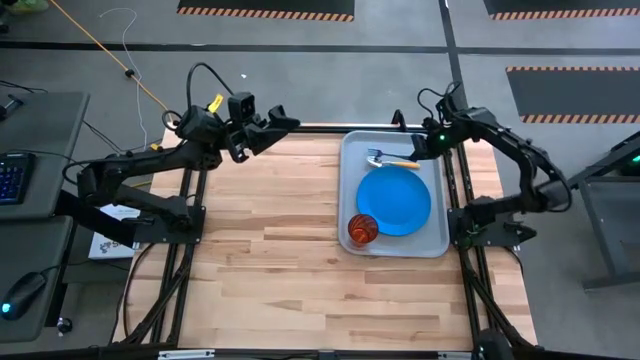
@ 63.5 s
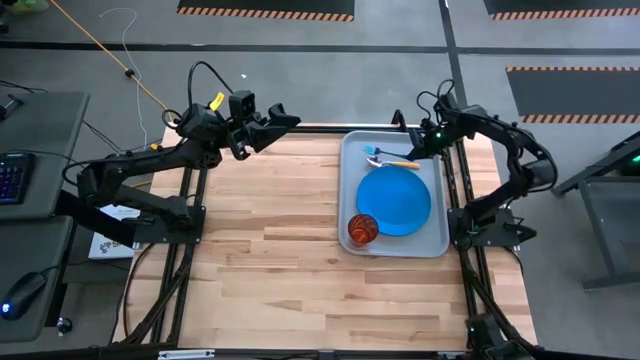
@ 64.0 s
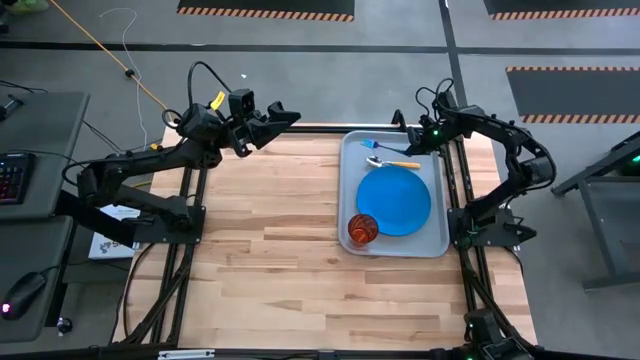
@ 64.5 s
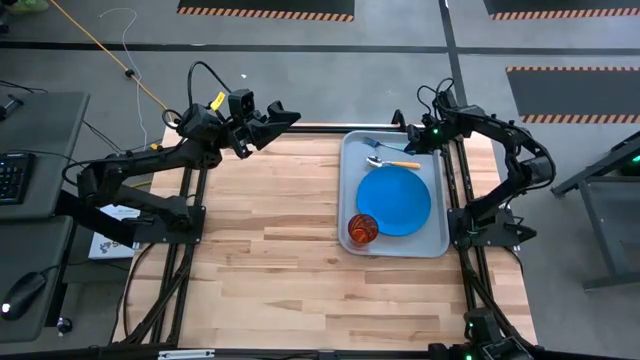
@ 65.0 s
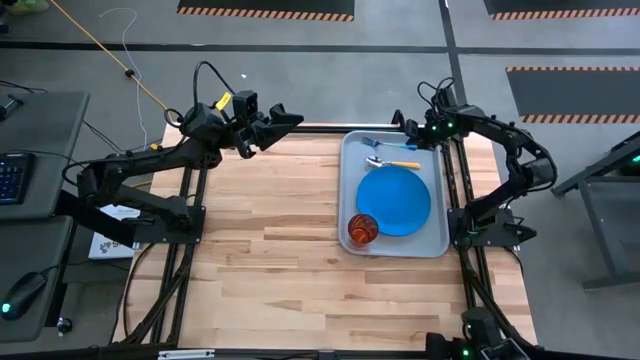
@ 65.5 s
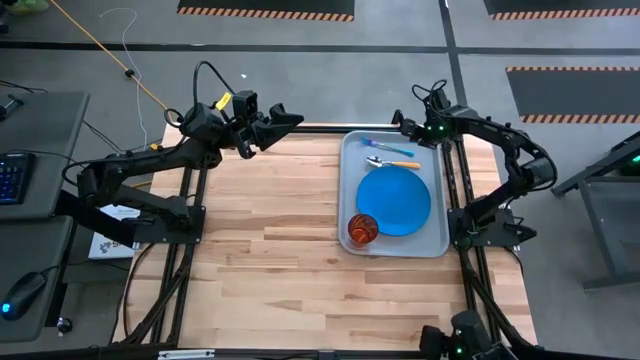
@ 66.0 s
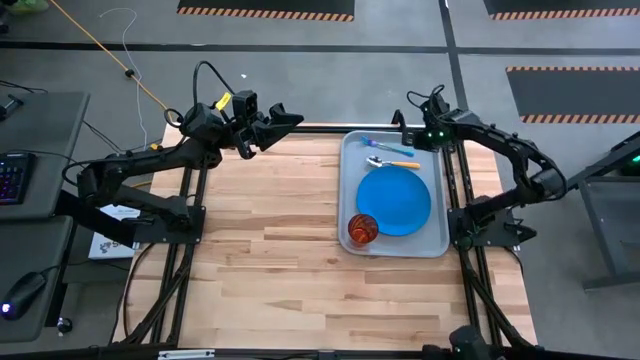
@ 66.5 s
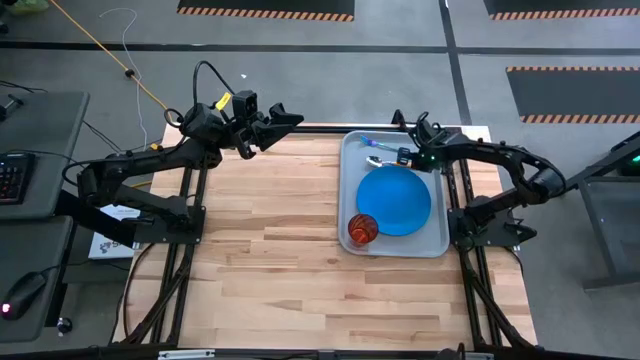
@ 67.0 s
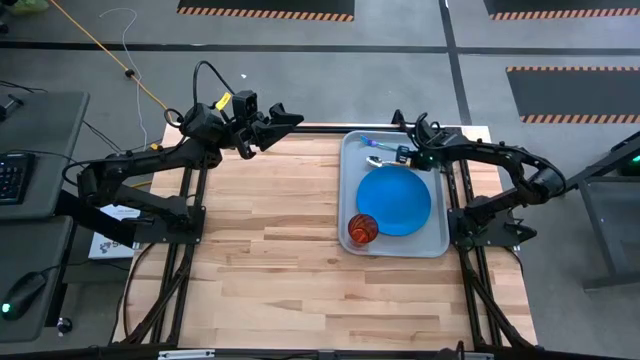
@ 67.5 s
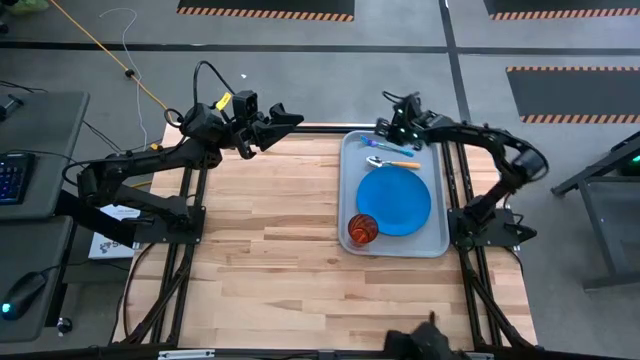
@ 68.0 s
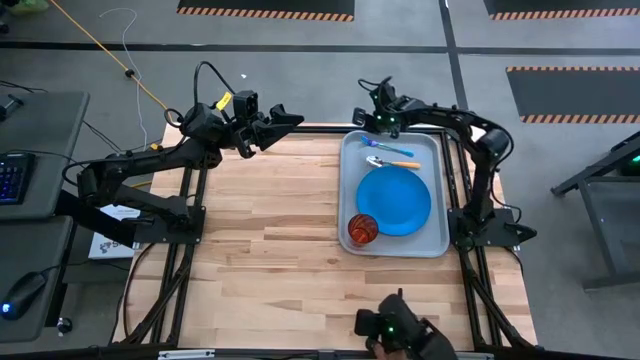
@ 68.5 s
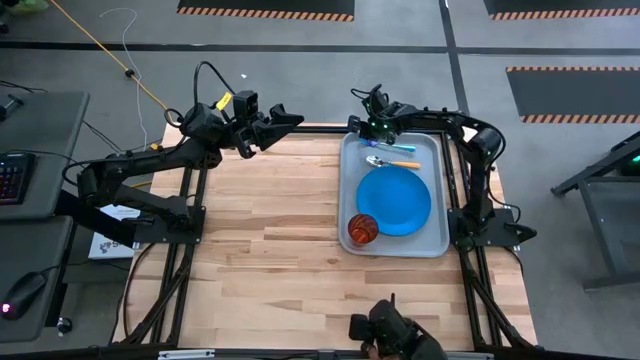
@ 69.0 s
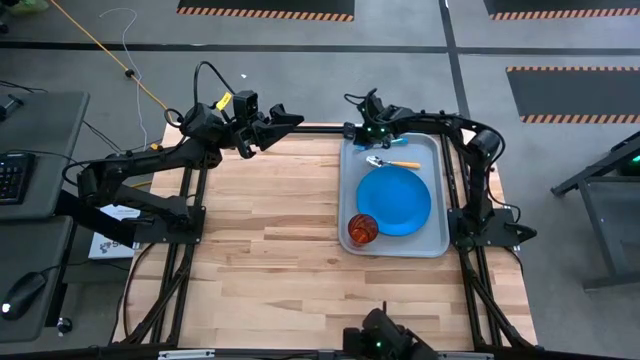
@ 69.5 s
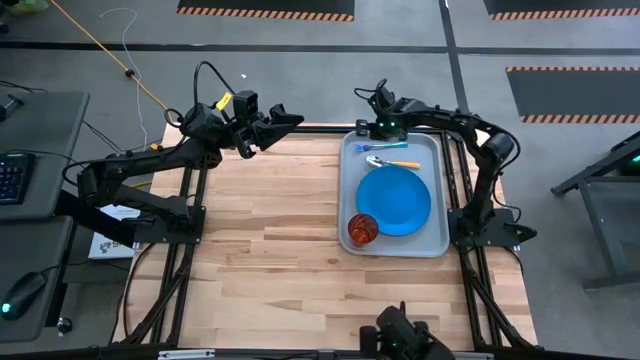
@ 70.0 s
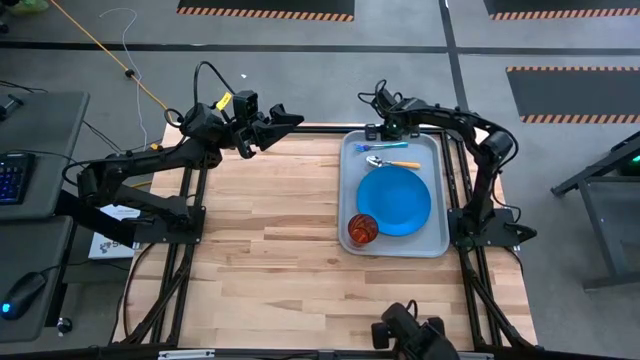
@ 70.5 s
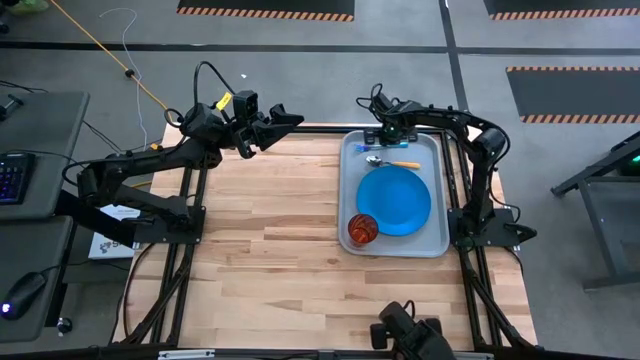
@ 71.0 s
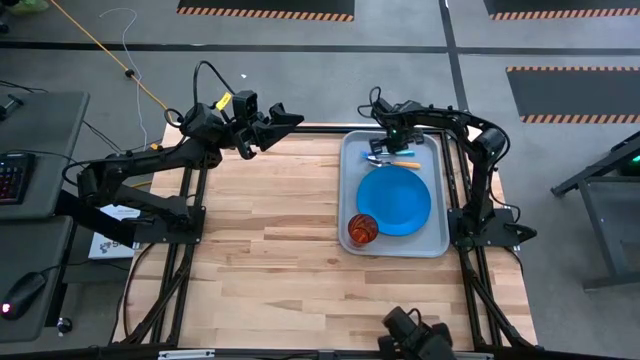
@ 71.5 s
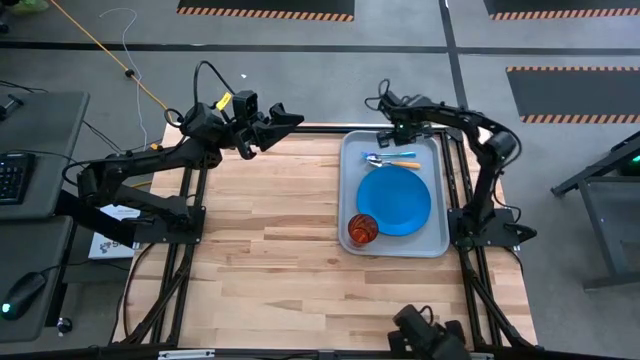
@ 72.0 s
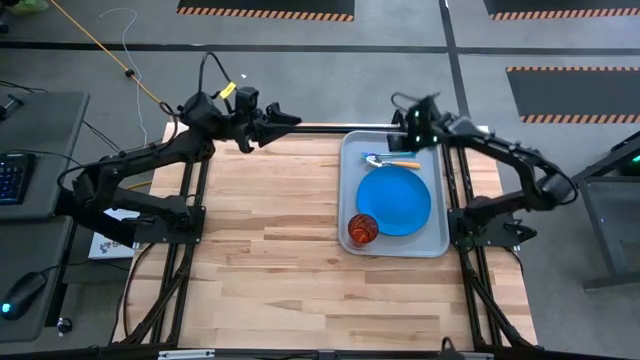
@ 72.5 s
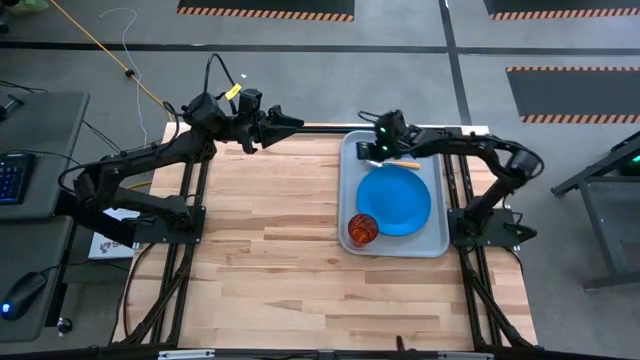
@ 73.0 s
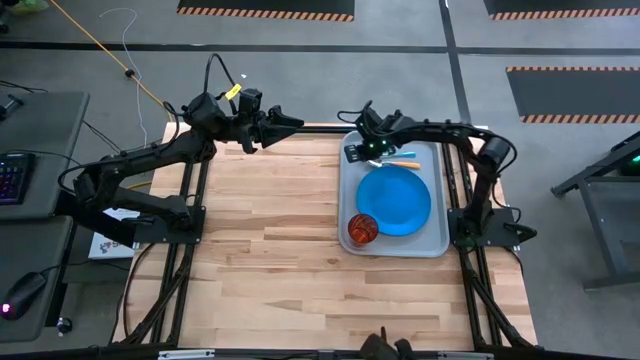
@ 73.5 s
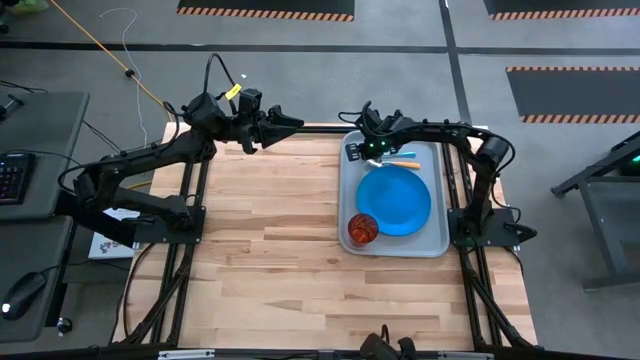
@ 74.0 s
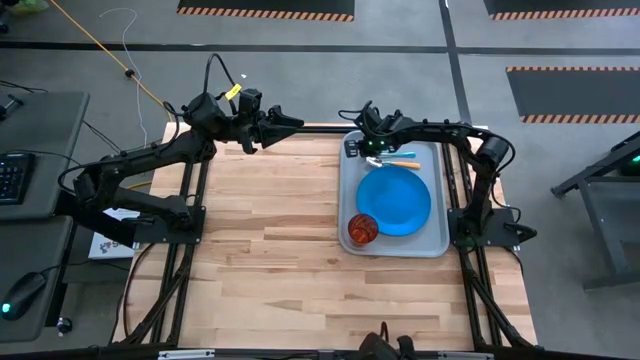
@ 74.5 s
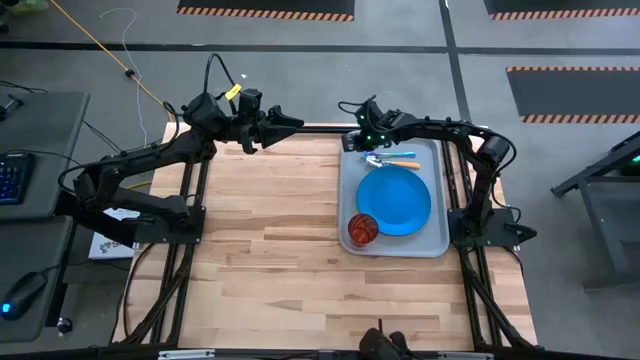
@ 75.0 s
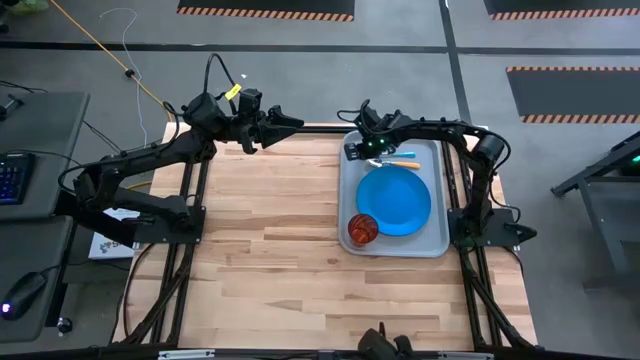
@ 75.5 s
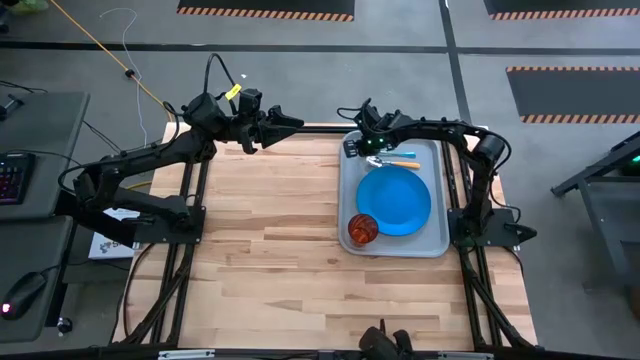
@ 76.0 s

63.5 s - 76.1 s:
Task: Pick and place plate/cup/fork/spoon on tray
Put the blue fork to the right of the yellow spoon on the gray serving tray

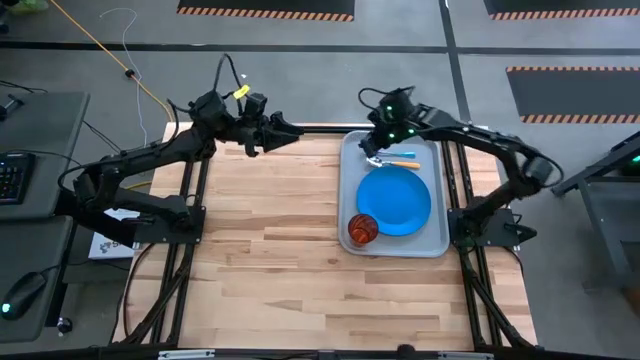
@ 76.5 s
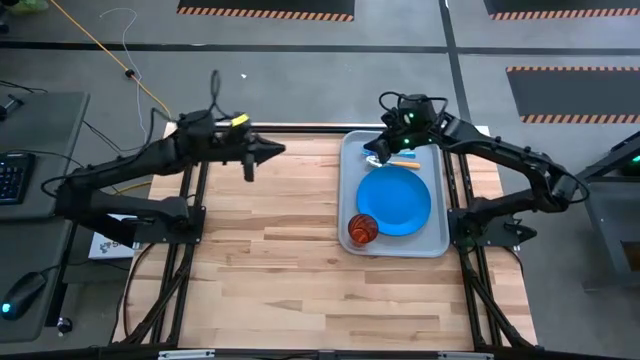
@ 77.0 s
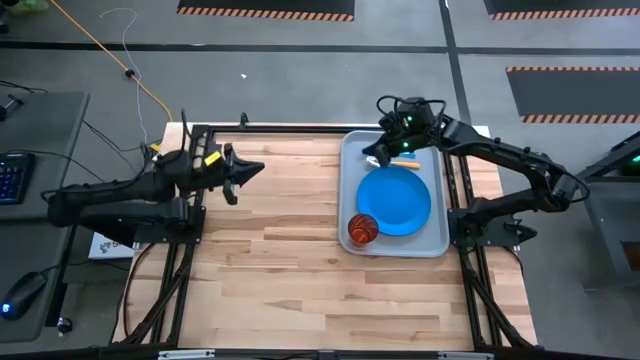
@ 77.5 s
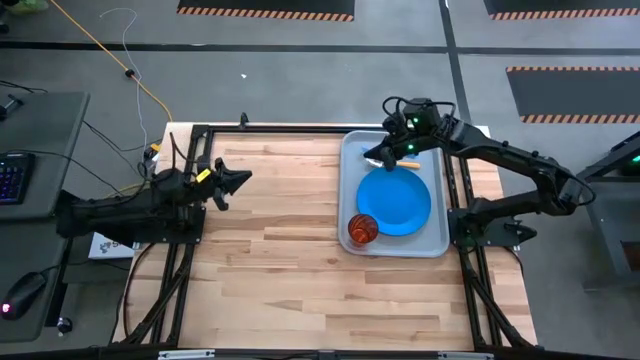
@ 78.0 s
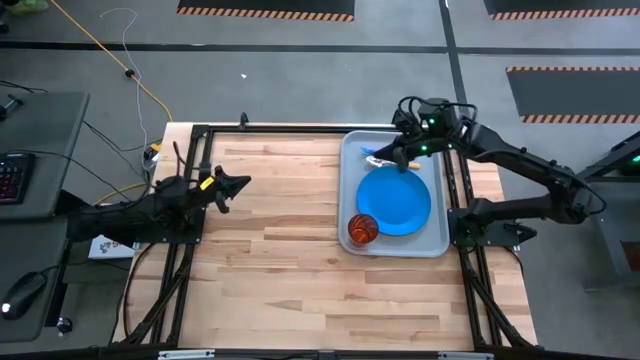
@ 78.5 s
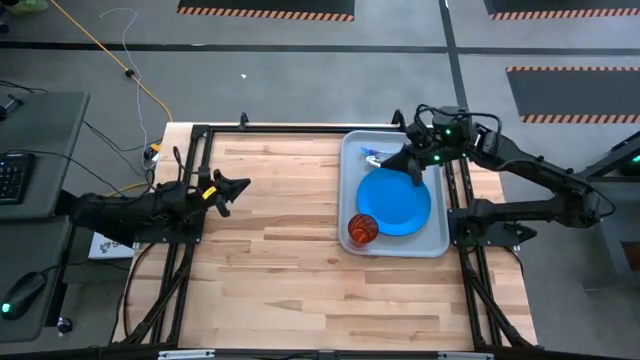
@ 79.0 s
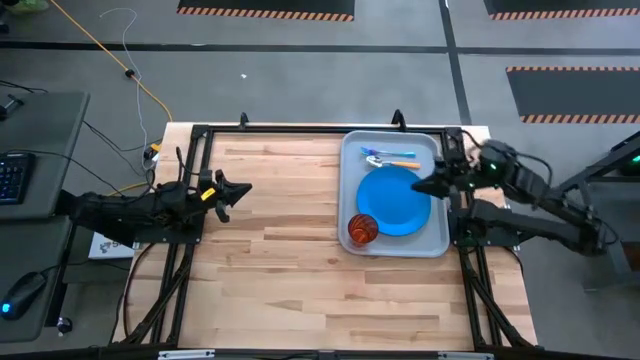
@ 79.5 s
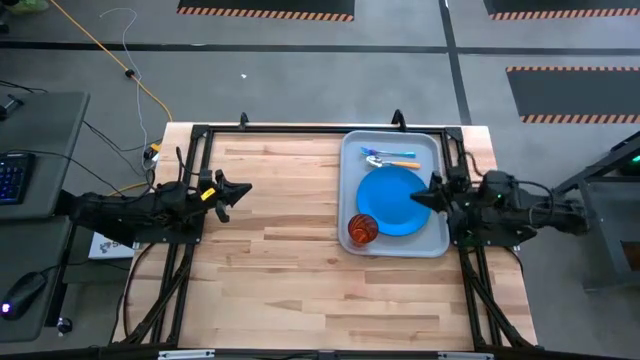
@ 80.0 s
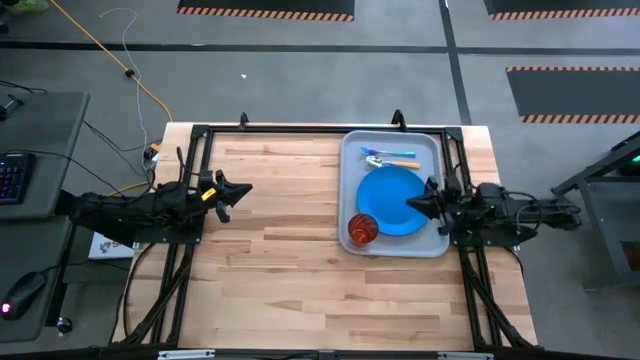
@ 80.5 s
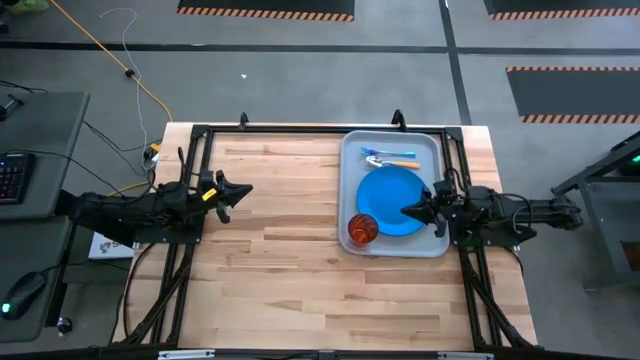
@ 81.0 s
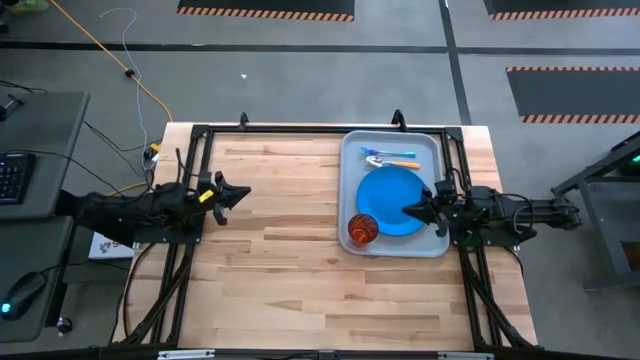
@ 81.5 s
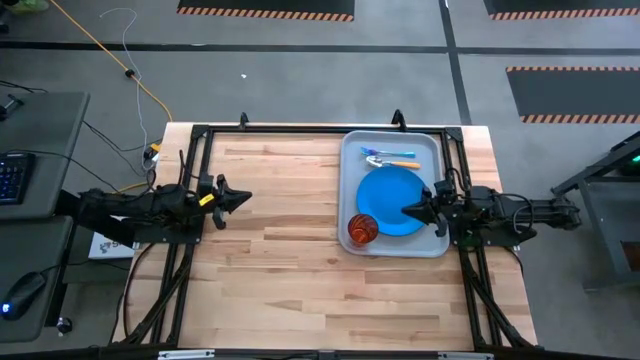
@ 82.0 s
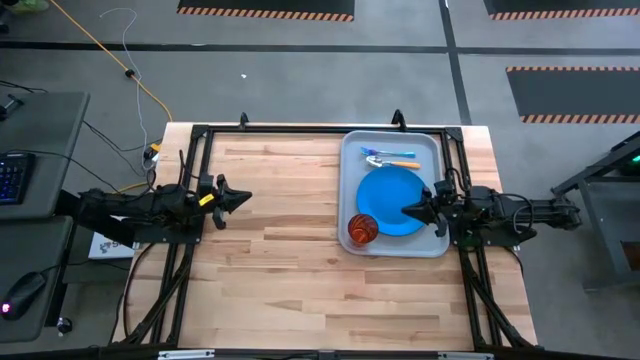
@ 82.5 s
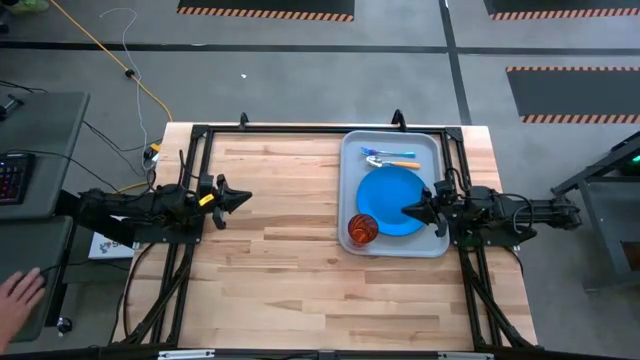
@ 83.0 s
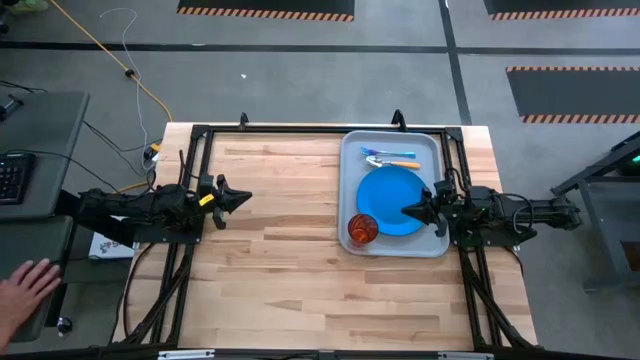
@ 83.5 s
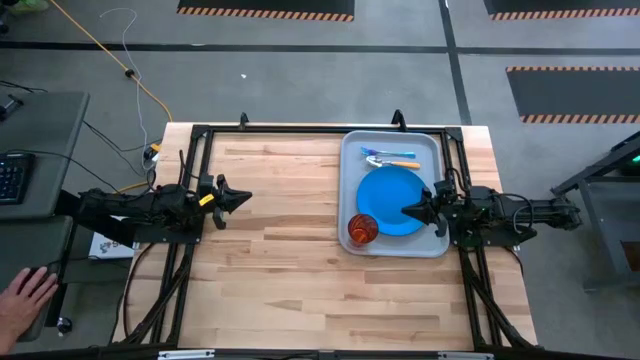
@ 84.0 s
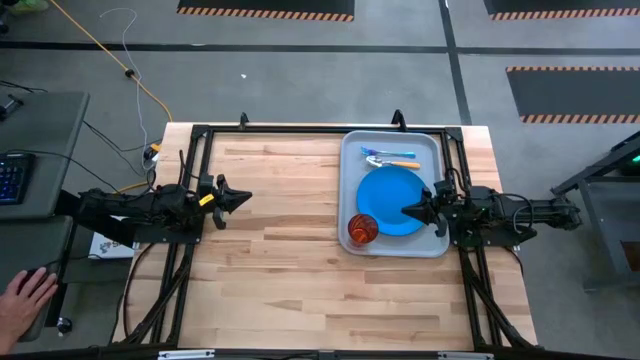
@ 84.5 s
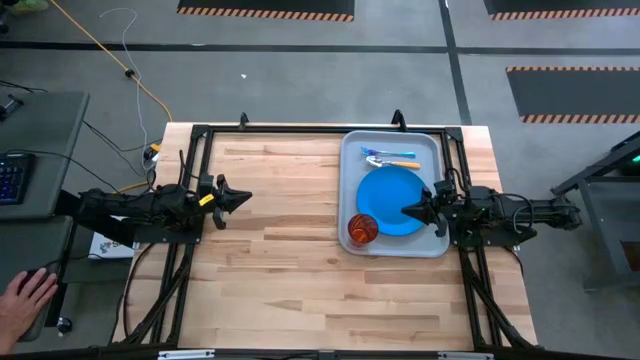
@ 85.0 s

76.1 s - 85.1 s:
Return to Home Position
